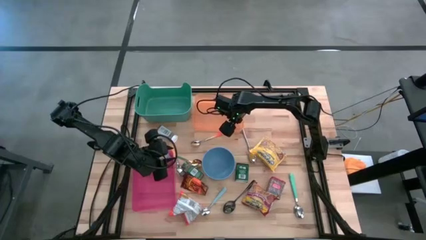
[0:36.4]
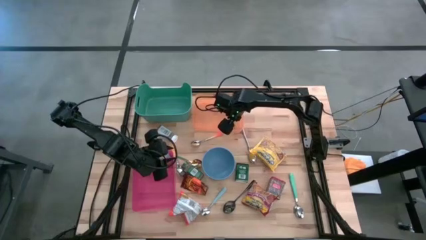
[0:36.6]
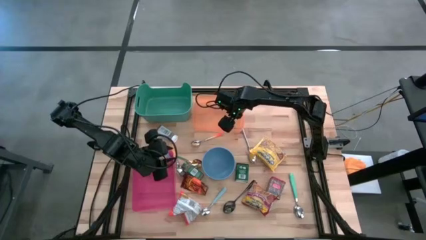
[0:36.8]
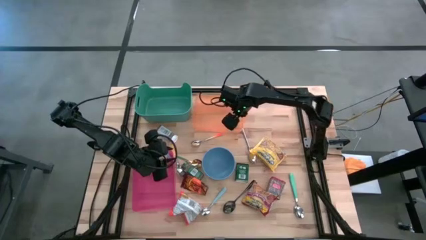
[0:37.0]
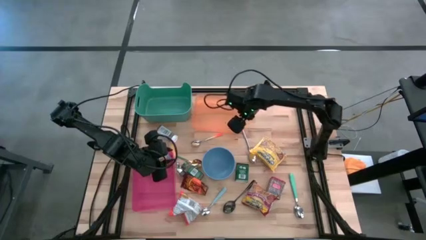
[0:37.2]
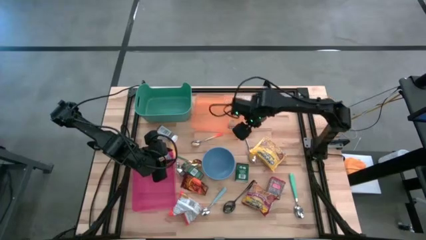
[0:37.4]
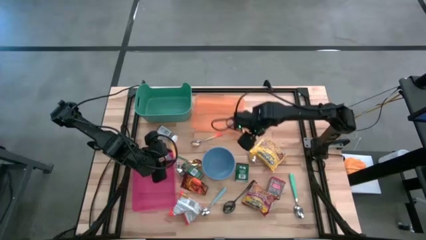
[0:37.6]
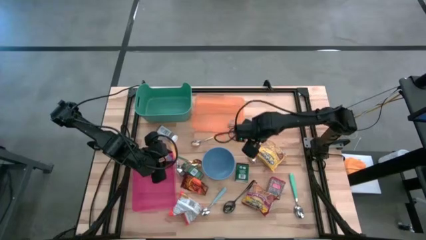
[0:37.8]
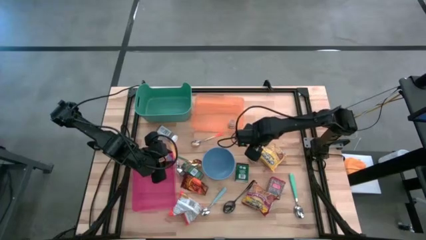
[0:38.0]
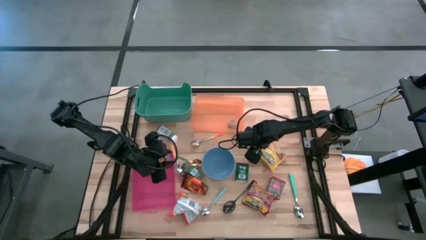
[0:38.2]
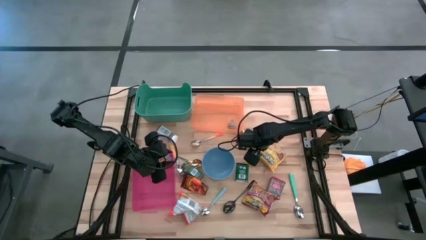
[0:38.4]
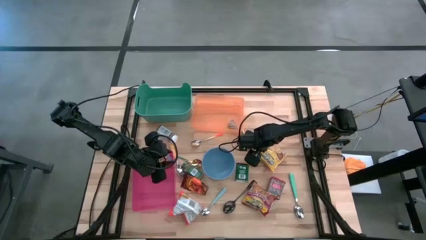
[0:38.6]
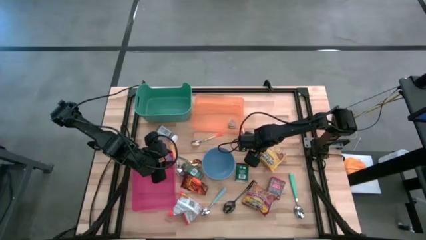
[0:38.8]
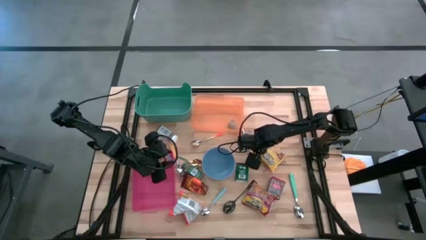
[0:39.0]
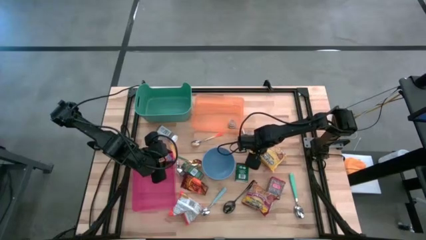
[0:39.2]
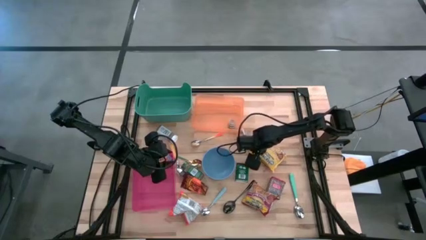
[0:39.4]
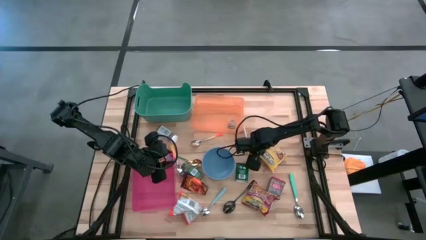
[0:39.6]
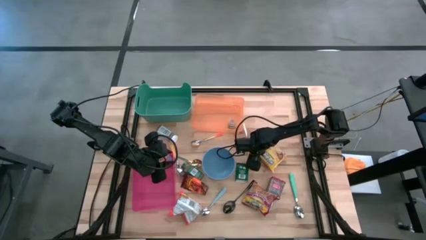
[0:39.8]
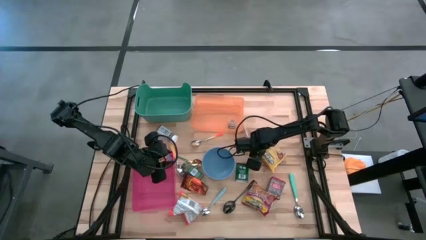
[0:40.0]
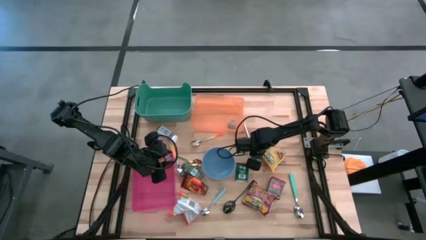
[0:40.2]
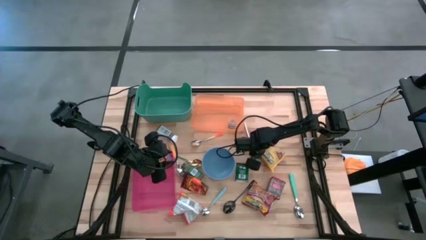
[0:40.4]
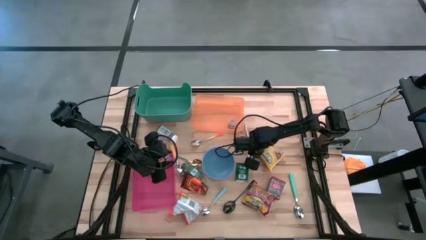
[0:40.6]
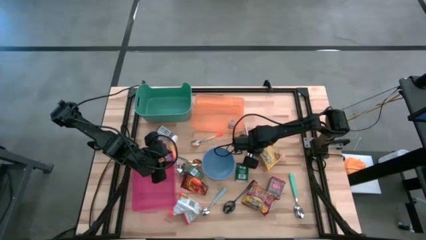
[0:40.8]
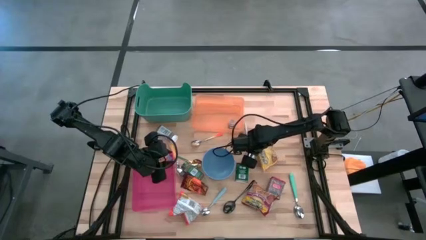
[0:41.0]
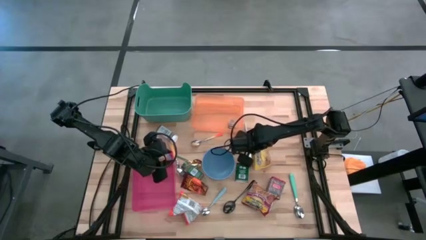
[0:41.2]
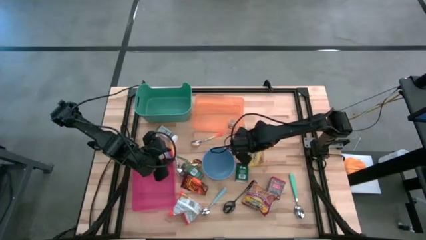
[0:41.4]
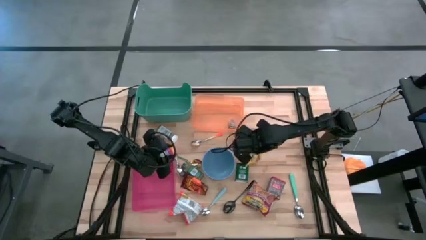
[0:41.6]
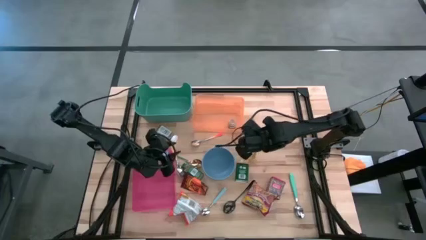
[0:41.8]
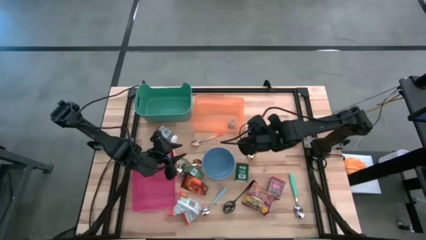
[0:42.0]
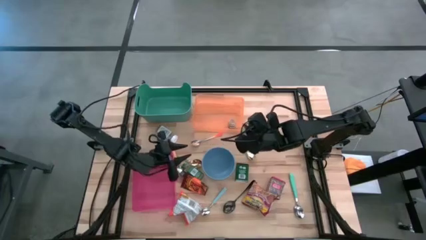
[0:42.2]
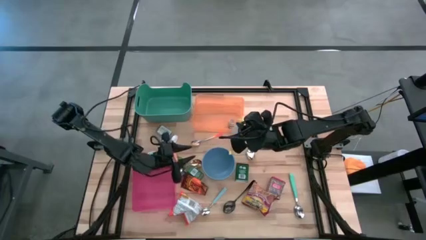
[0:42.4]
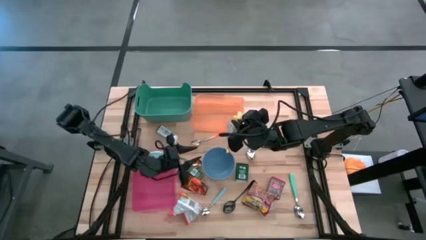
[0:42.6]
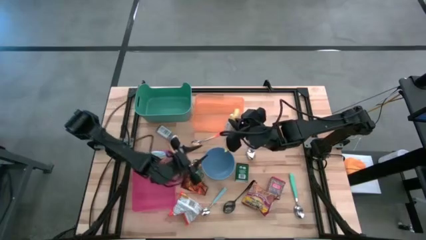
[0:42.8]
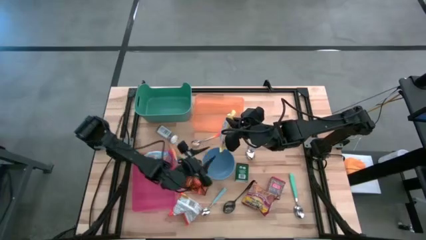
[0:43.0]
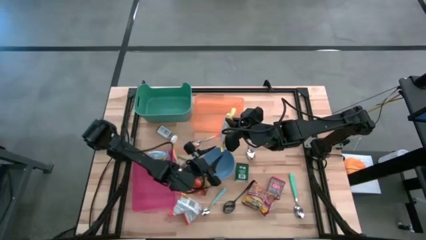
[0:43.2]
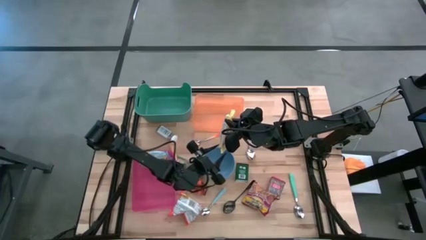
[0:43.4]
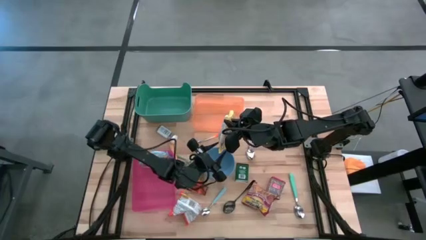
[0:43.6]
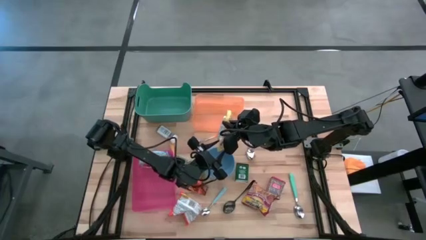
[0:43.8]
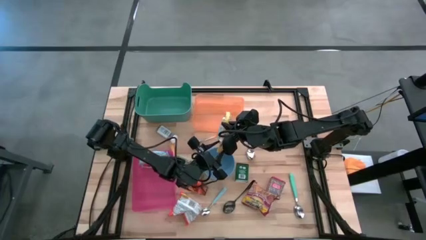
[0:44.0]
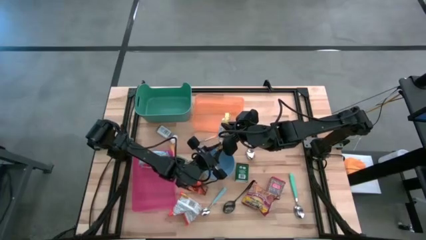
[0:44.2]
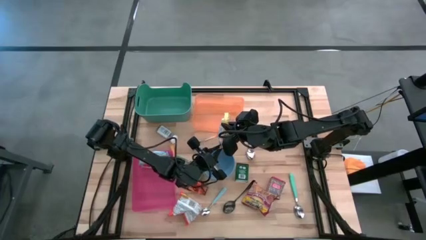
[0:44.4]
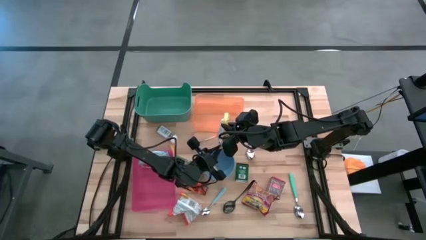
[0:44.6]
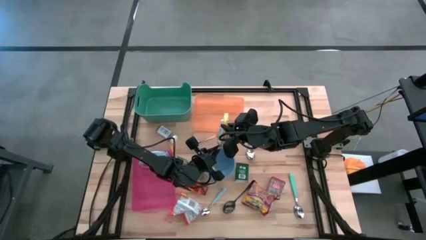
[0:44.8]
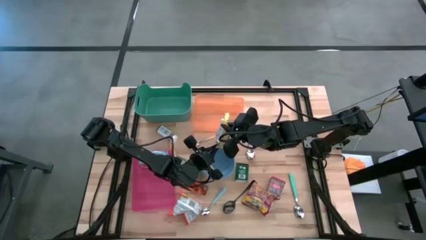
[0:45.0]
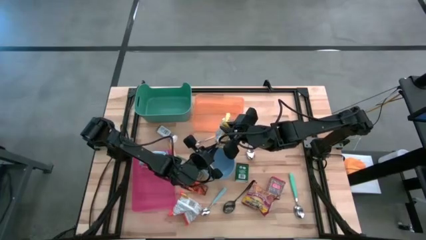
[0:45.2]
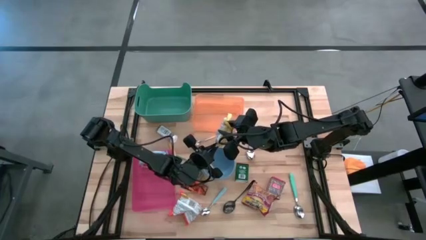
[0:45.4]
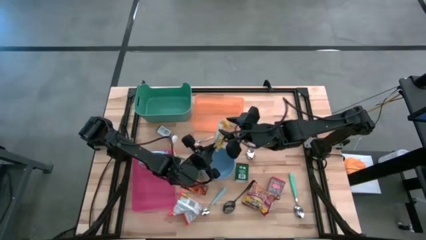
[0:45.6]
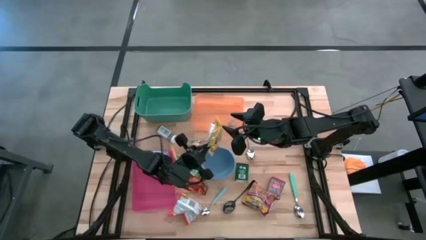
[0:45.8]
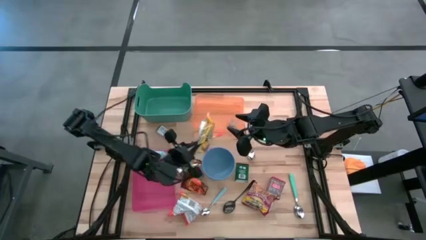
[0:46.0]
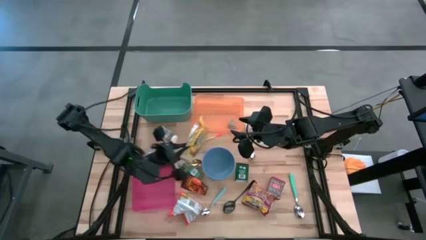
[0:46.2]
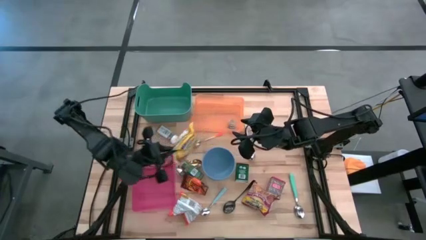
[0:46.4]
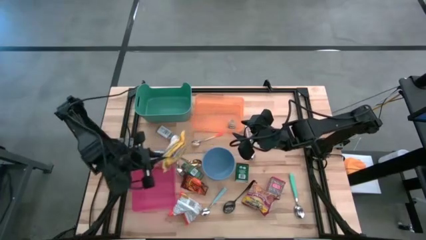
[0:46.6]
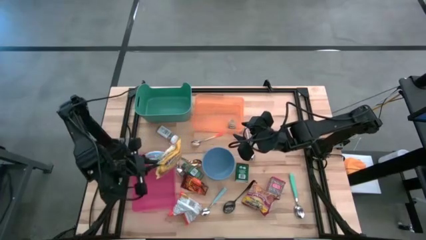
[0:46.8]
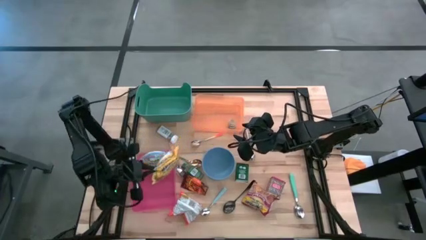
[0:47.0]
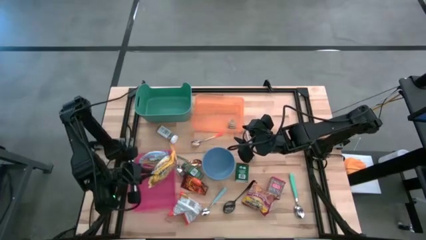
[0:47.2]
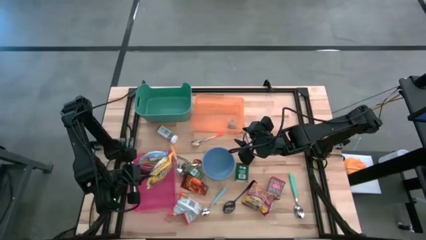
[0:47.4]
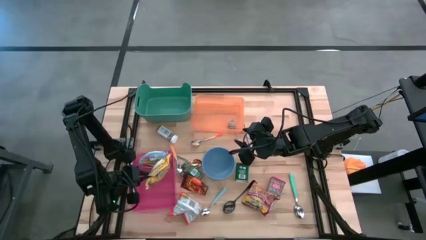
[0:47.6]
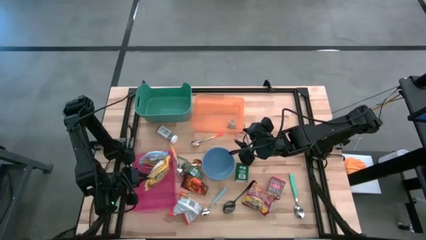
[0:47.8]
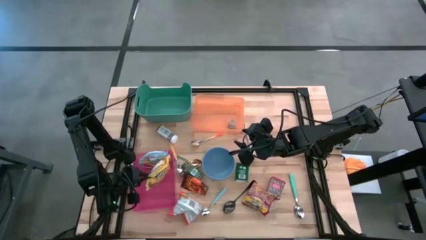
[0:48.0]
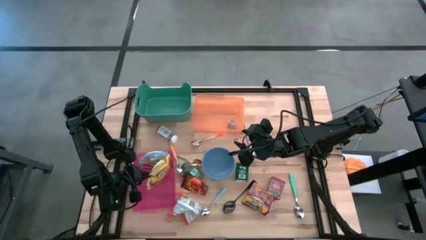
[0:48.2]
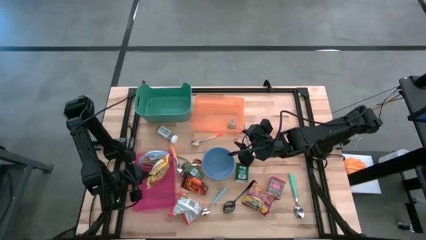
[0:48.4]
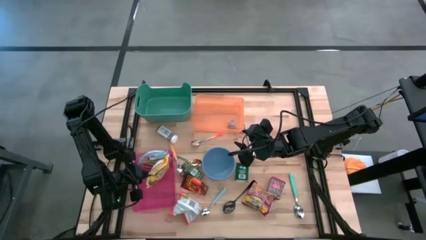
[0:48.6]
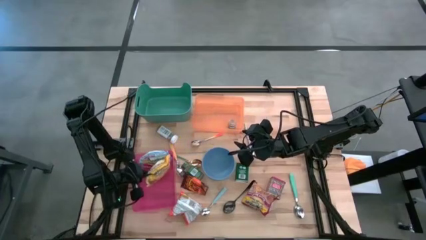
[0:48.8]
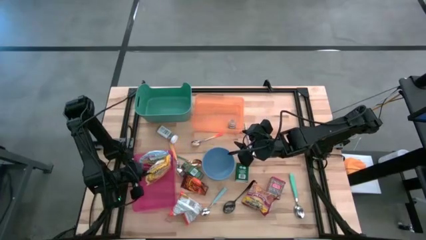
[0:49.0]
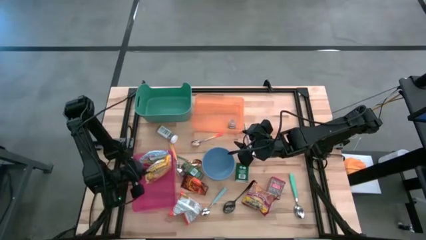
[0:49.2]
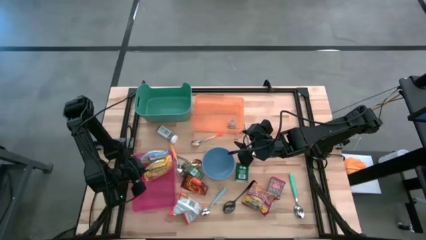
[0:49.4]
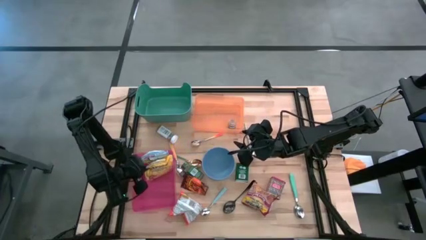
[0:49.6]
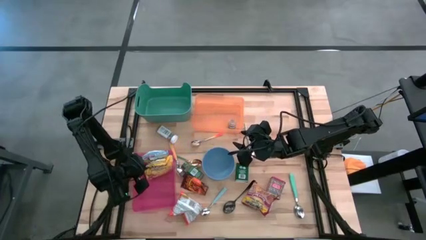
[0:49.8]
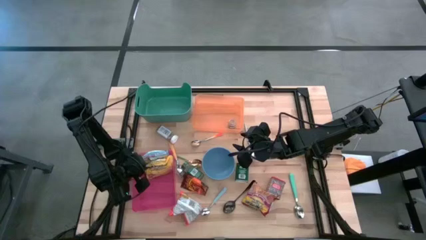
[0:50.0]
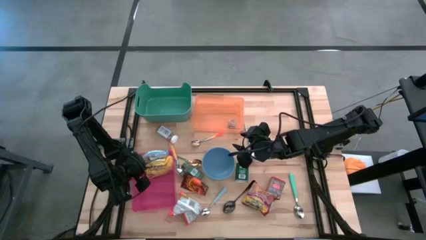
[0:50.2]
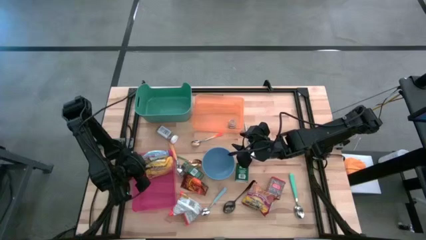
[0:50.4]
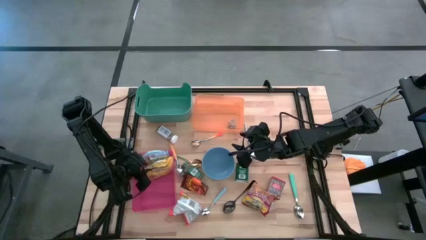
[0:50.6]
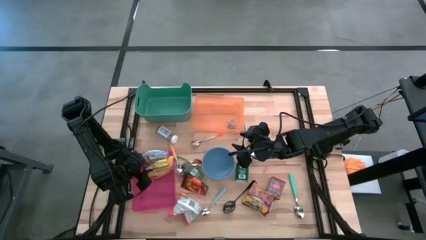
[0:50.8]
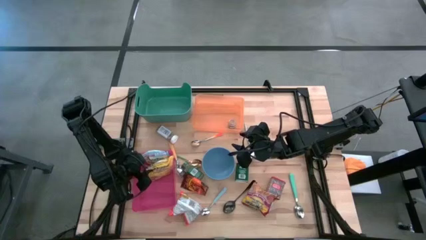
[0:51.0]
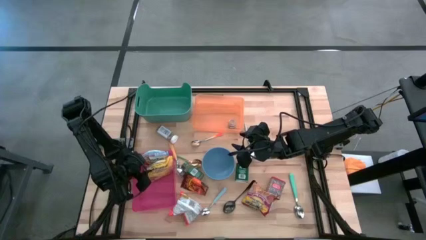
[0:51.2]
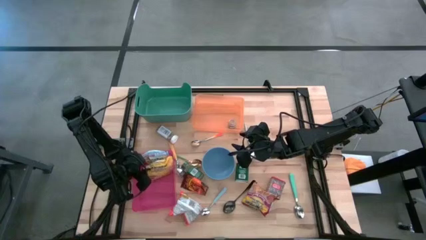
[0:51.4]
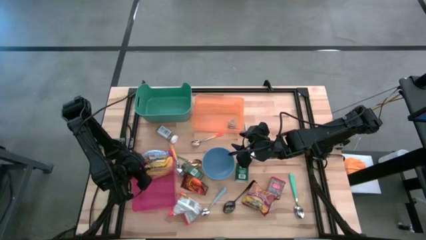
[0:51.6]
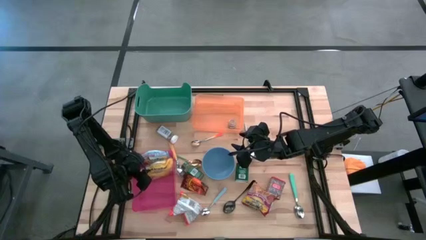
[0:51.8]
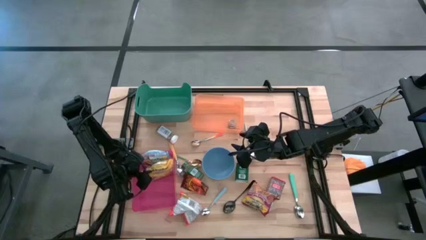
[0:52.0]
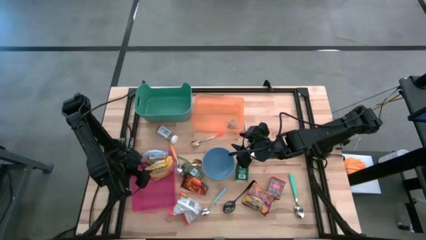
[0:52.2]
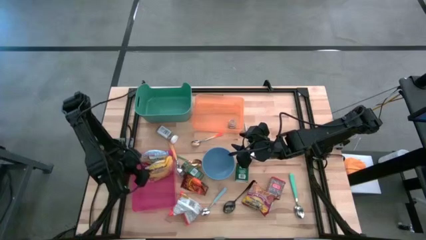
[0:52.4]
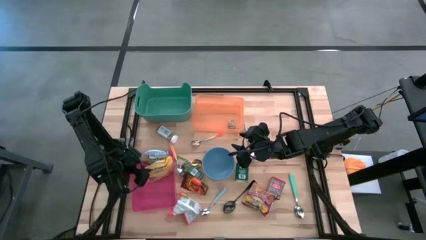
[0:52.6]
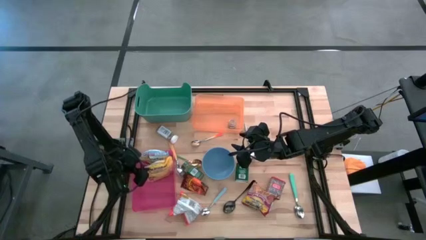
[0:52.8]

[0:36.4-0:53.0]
Put the yellow noodle pack into the pink bin
